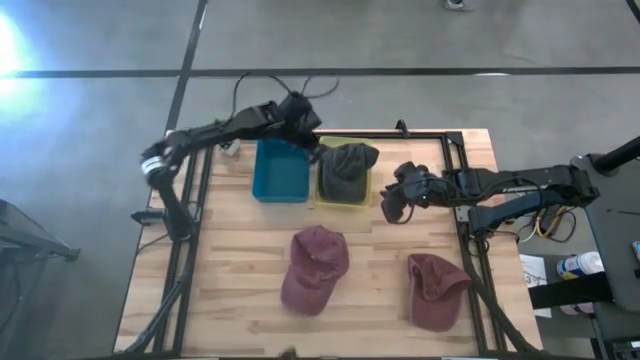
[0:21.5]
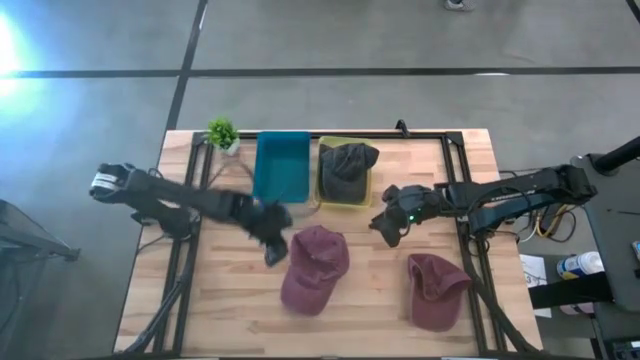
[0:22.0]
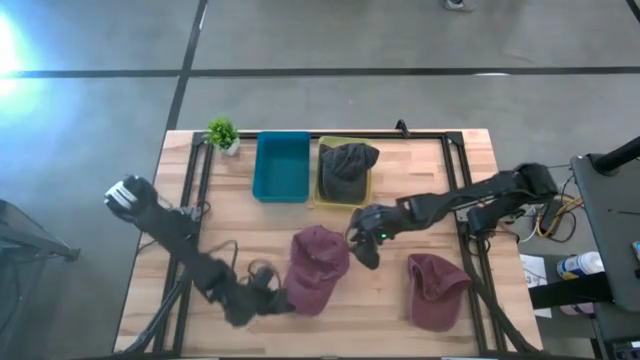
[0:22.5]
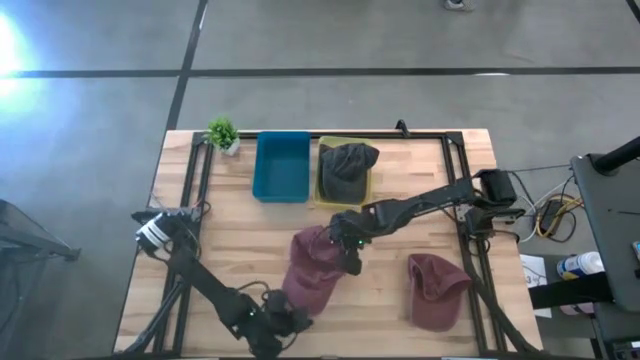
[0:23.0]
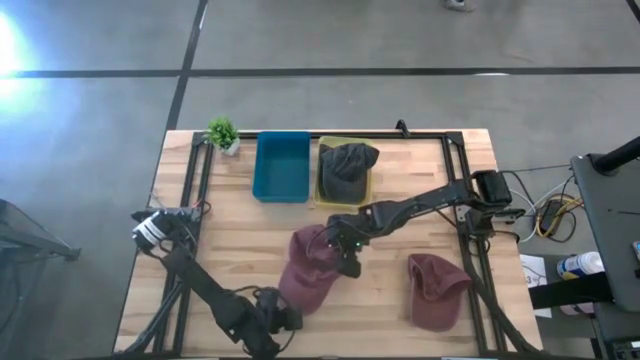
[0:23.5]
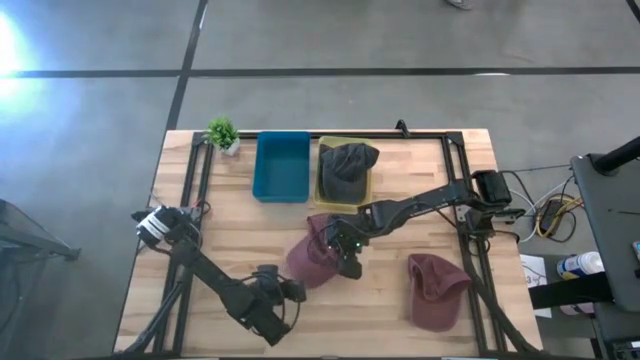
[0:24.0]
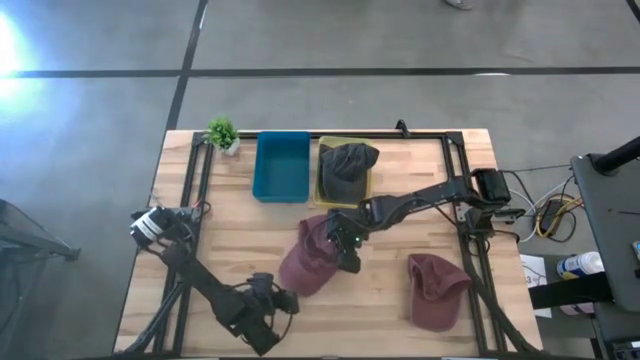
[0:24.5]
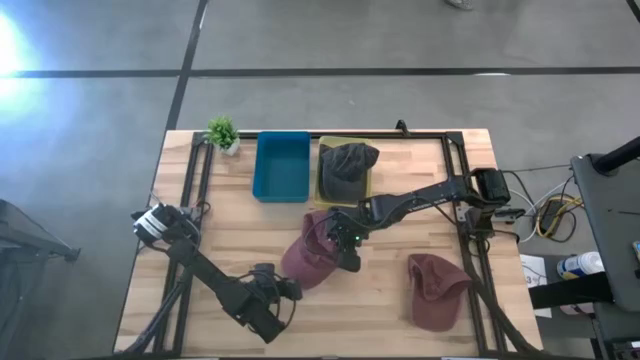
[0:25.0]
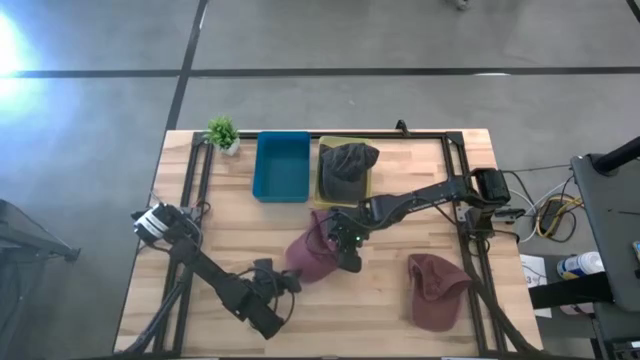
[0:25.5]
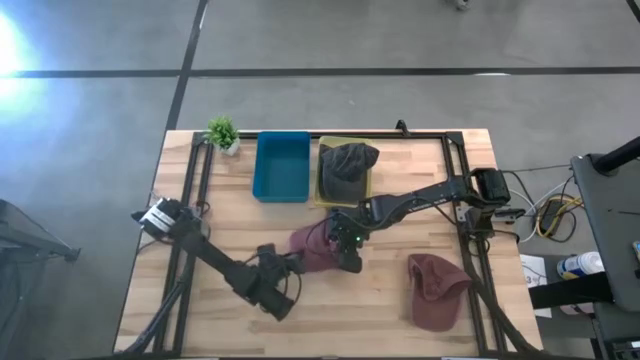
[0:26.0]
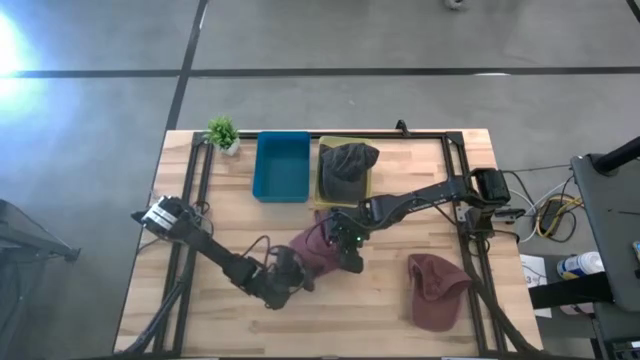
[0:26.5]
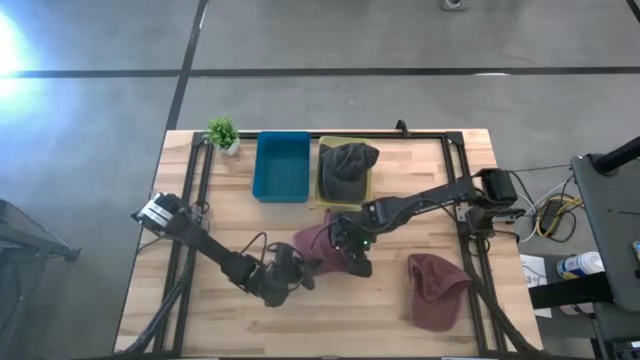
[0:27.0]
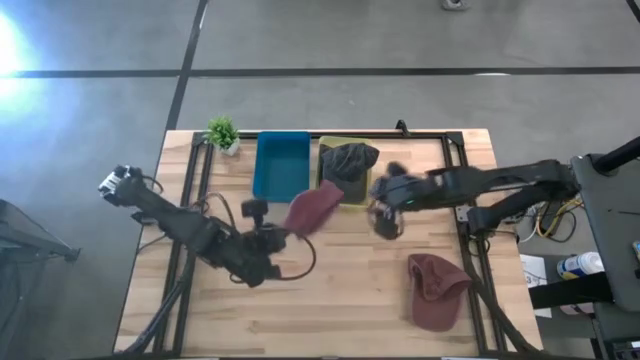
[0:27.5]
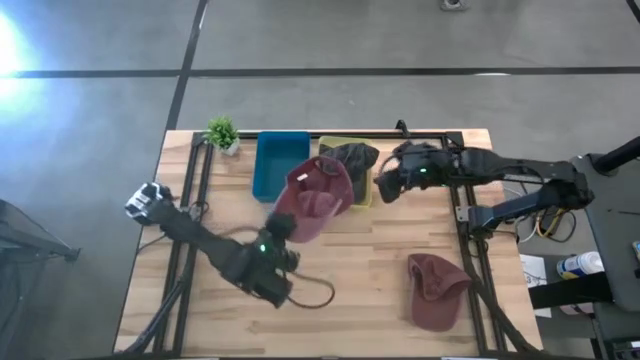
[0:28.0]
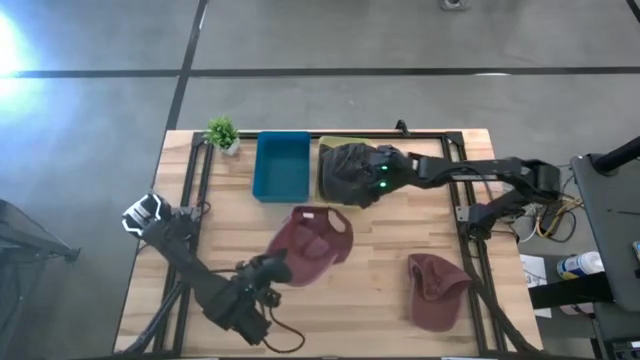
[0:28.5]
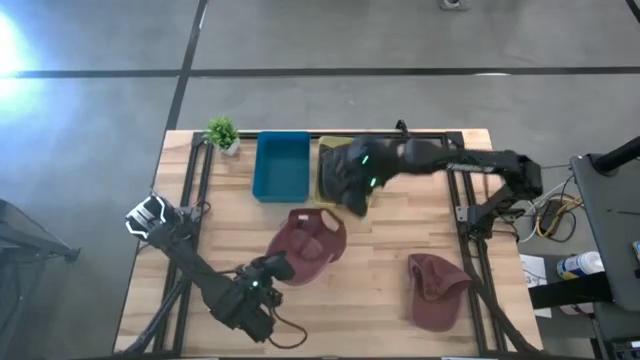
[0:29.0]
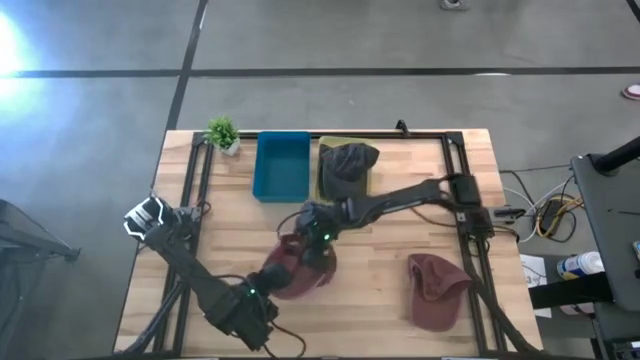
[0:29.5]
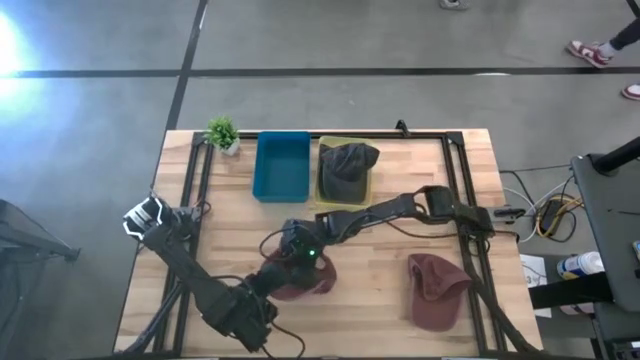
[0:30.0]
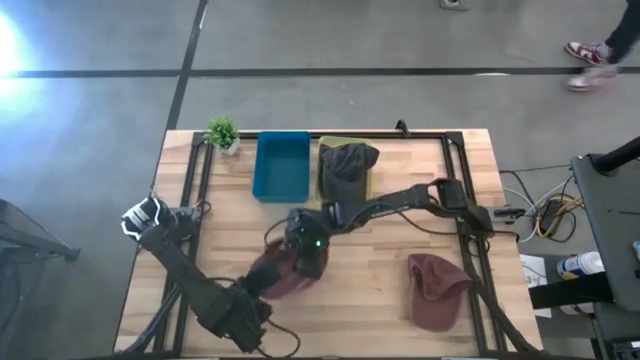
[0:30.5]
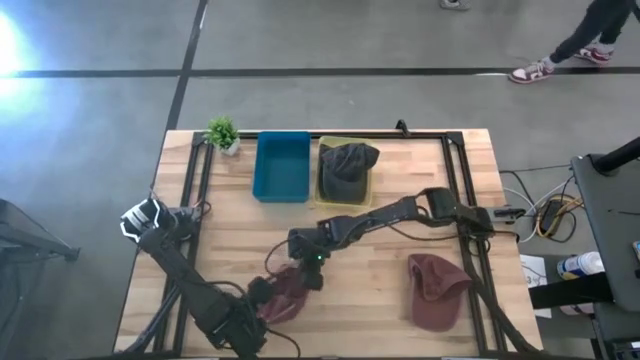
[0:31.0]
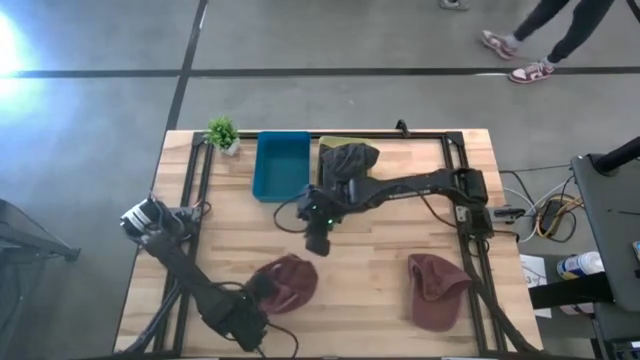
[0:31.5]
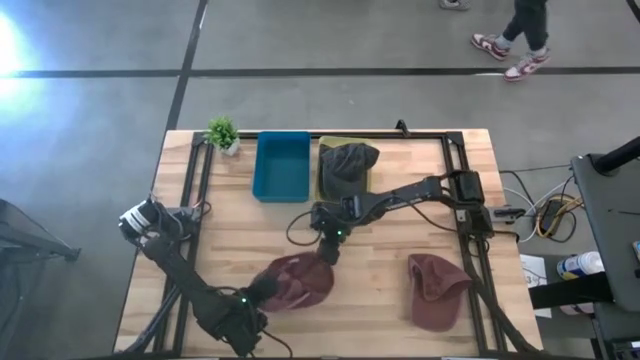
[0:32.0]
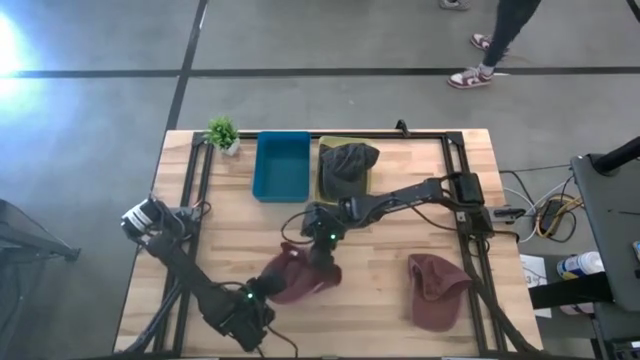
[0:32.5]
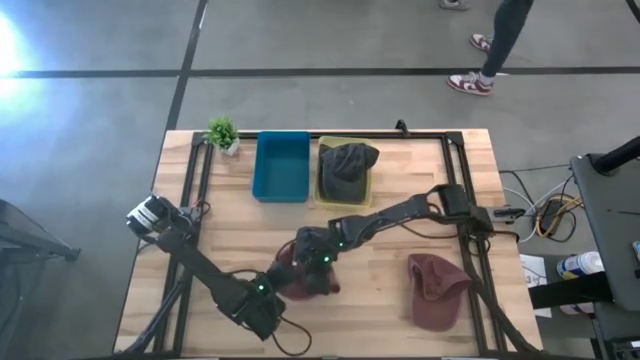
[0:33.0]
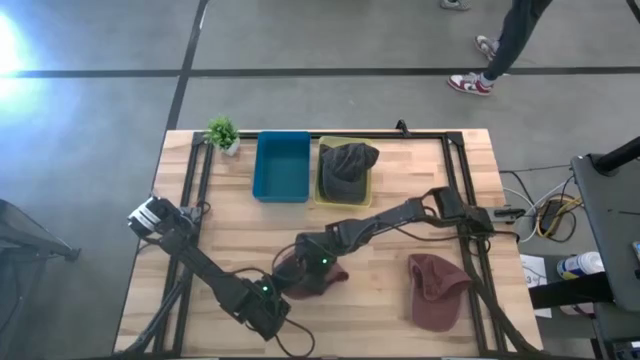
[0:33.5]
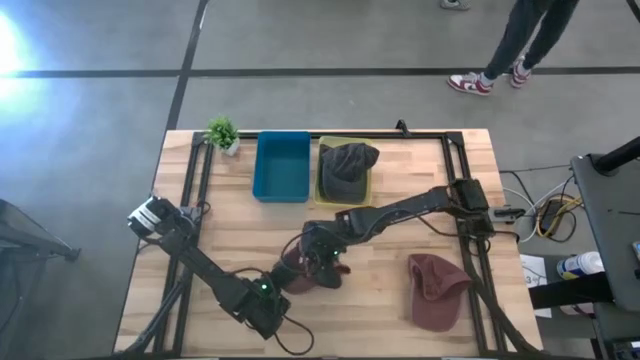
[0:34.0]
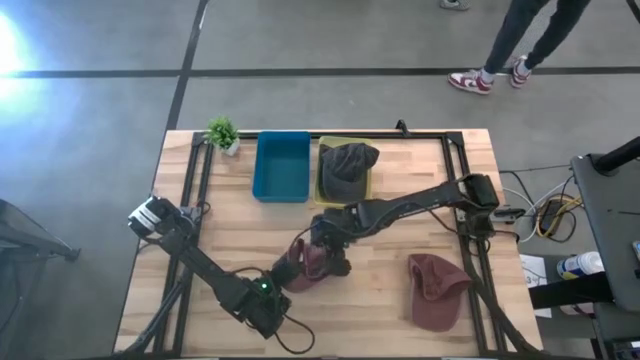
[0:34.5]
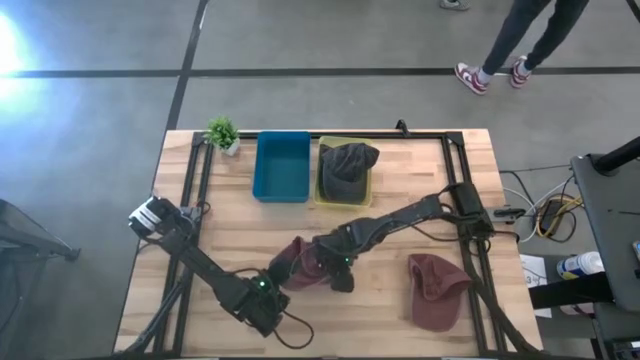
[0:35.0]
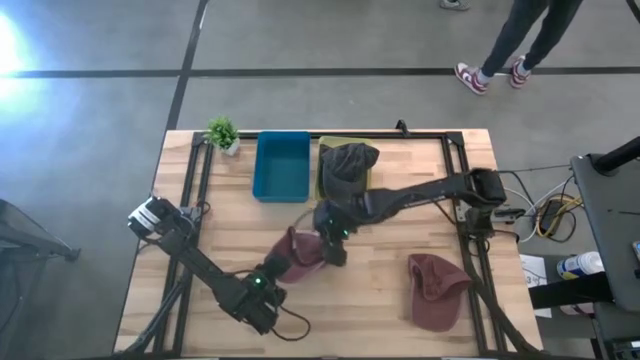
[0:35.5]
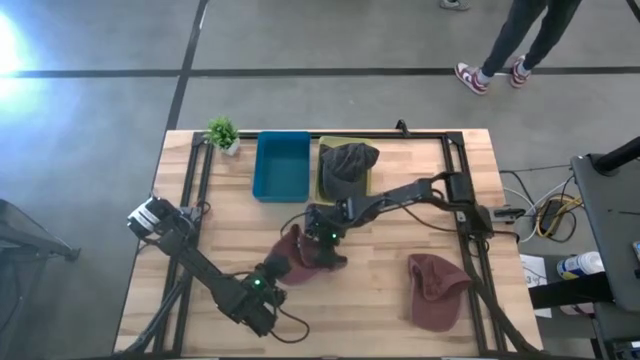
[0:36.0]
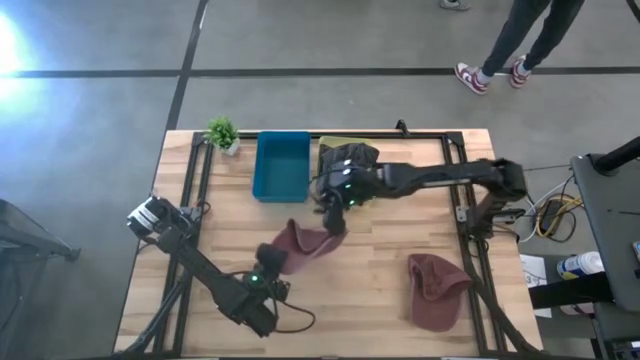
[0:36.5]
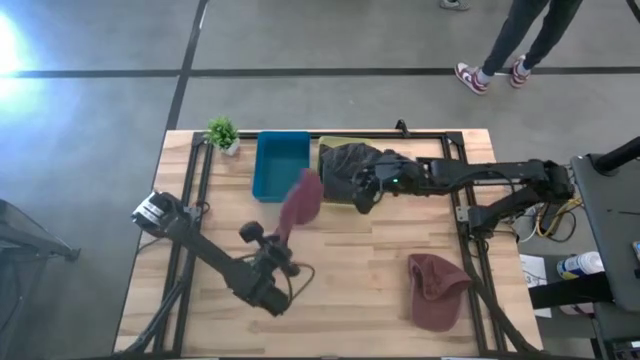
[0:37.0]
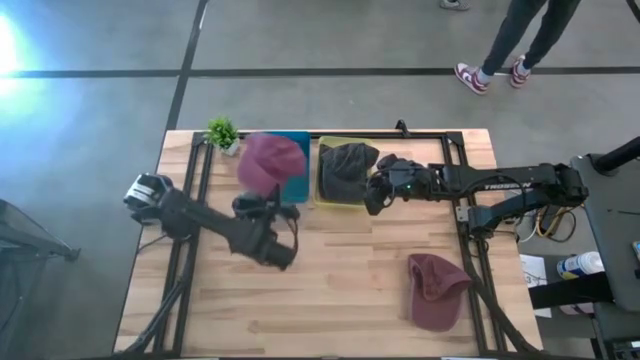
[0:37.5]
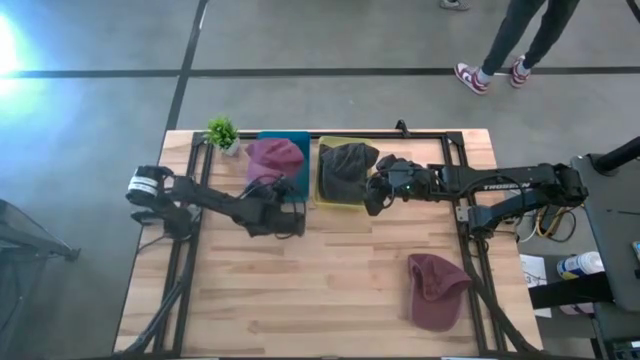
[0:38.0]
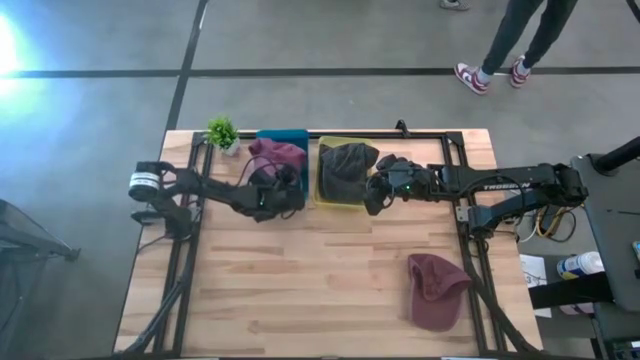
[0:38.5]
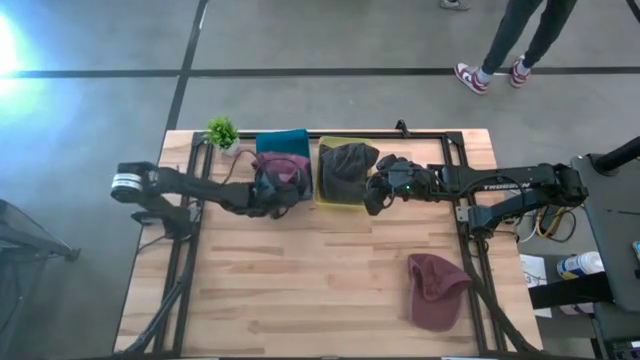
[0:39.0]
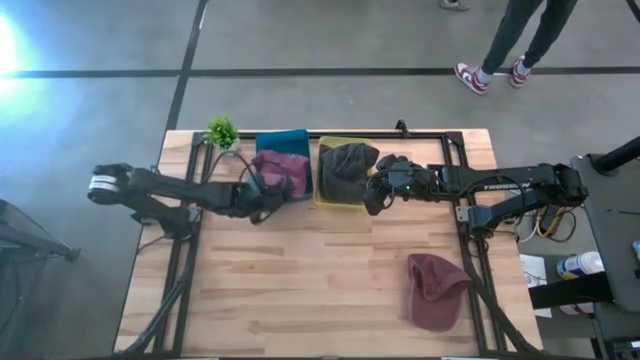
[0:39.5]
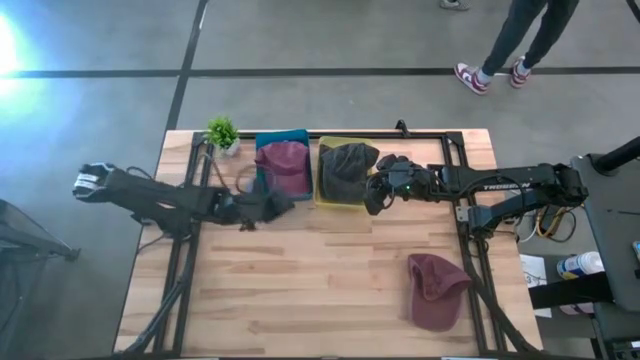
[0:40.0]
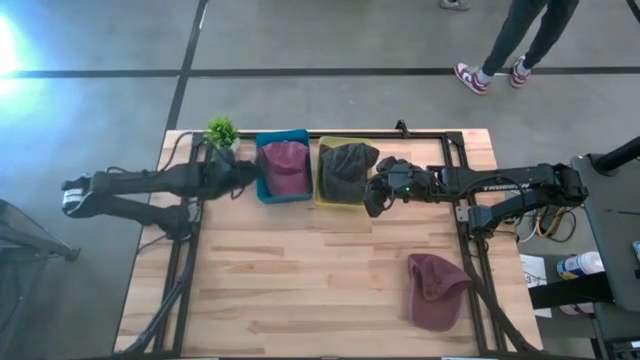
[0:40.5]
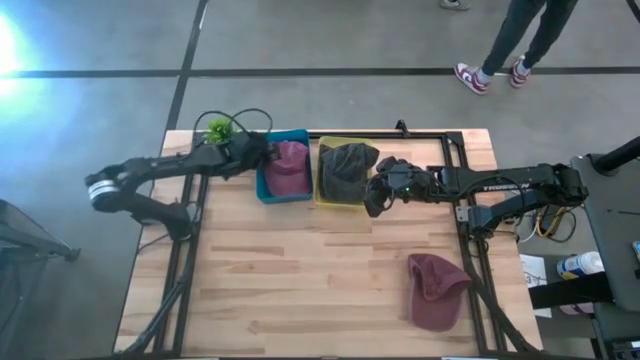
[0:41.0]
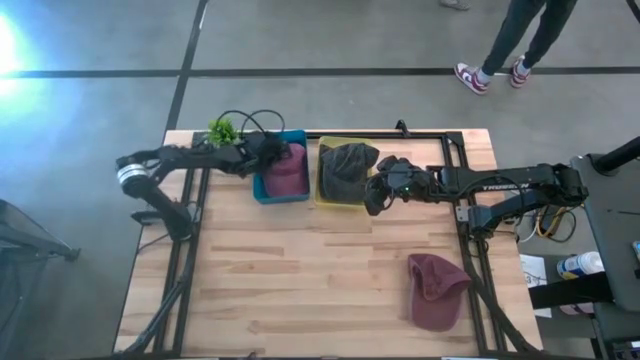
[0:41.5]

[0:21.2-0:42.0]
Task: Pick & Place hat
Put the left red cap into the blue bin
